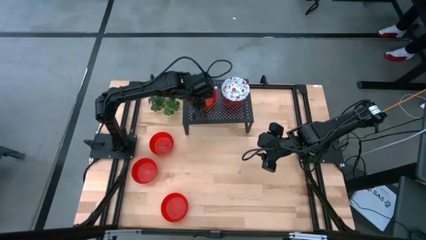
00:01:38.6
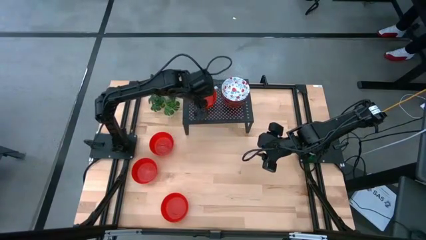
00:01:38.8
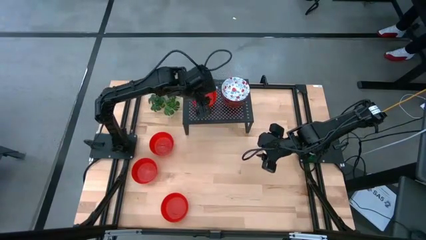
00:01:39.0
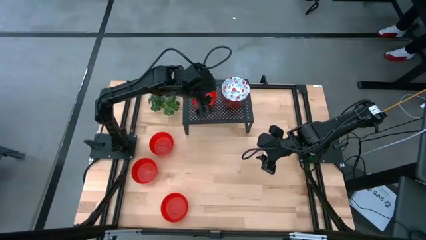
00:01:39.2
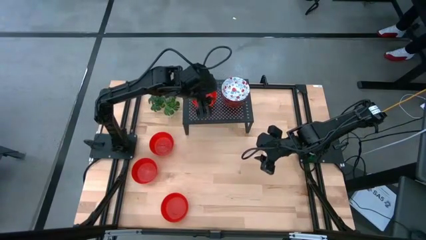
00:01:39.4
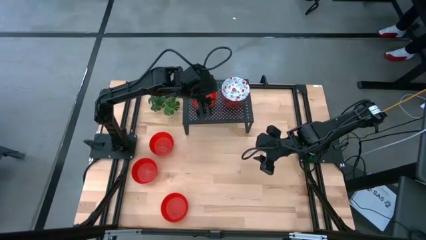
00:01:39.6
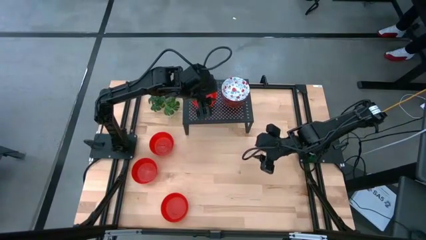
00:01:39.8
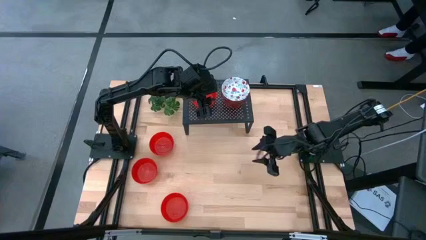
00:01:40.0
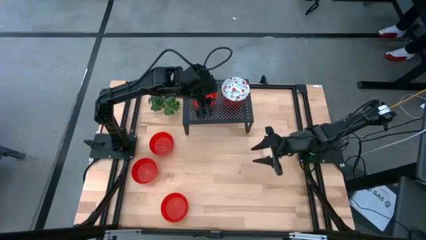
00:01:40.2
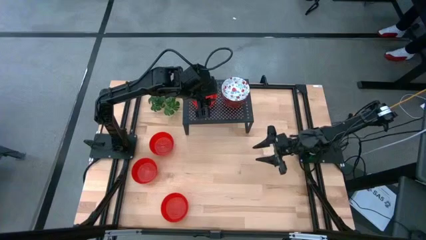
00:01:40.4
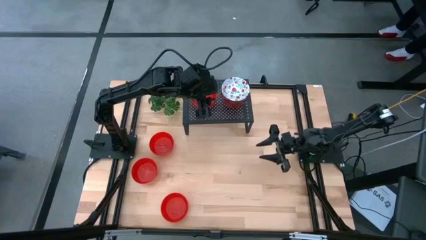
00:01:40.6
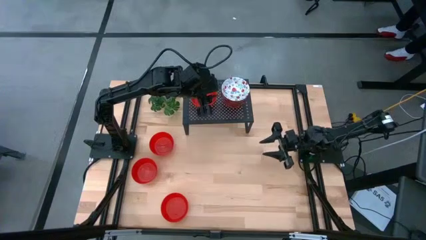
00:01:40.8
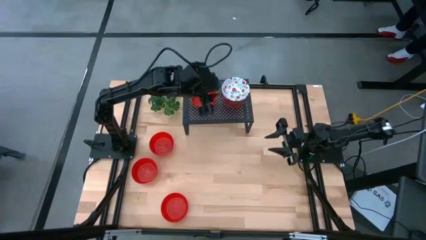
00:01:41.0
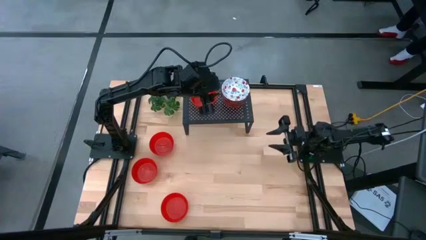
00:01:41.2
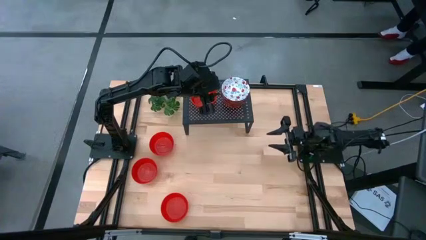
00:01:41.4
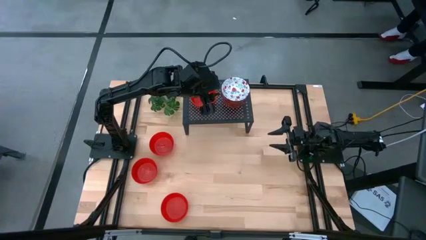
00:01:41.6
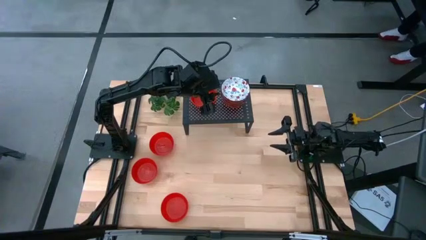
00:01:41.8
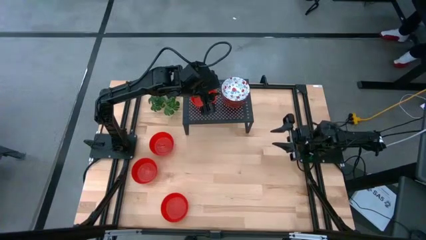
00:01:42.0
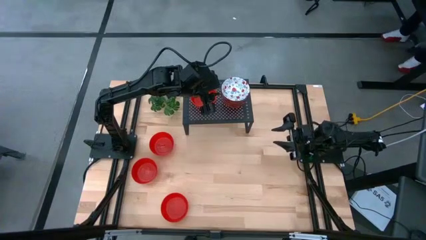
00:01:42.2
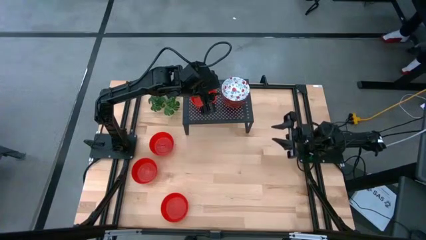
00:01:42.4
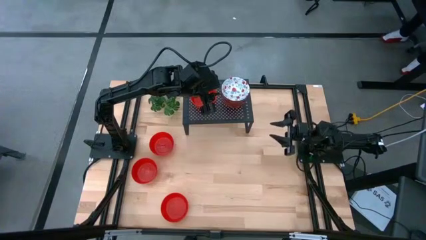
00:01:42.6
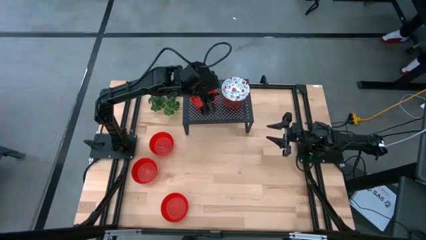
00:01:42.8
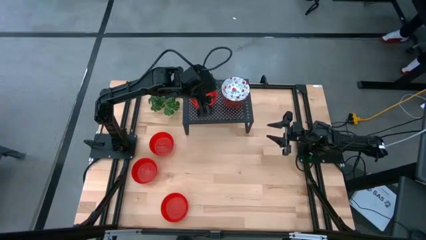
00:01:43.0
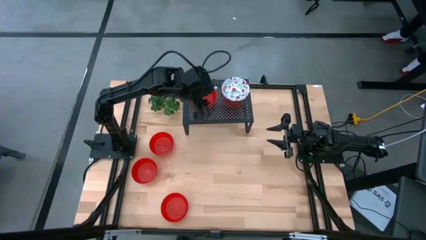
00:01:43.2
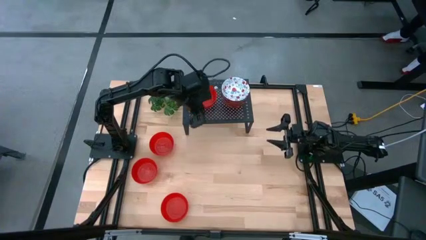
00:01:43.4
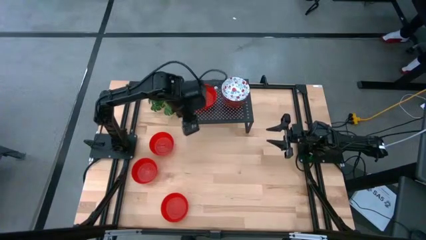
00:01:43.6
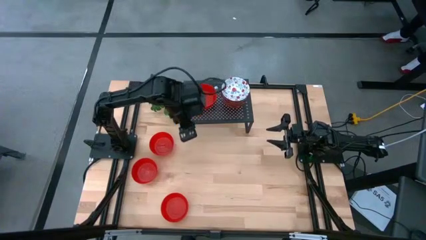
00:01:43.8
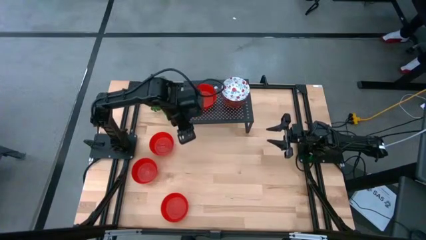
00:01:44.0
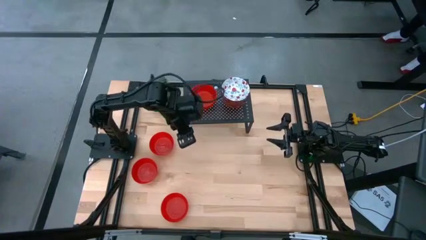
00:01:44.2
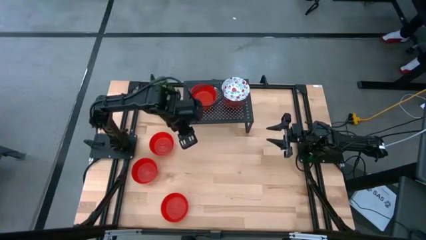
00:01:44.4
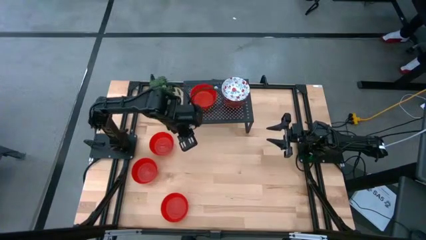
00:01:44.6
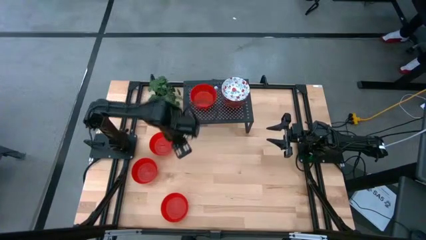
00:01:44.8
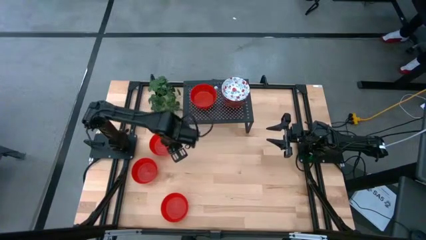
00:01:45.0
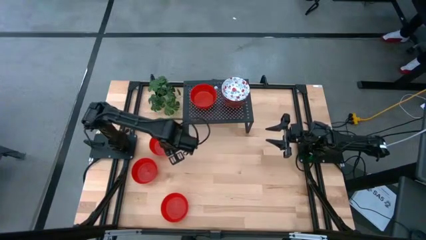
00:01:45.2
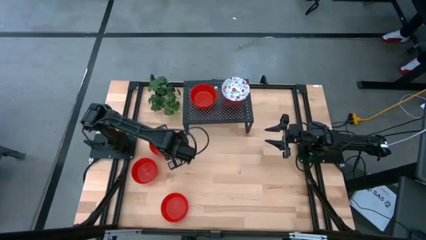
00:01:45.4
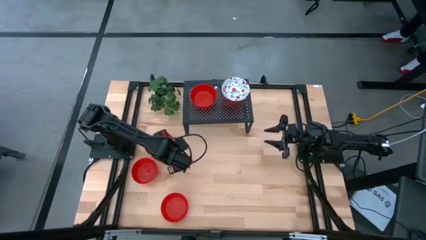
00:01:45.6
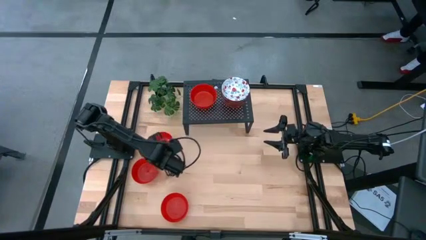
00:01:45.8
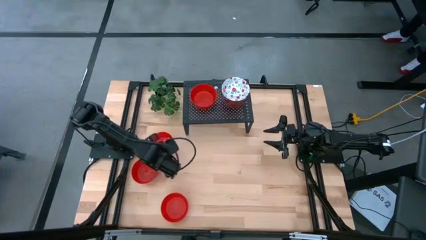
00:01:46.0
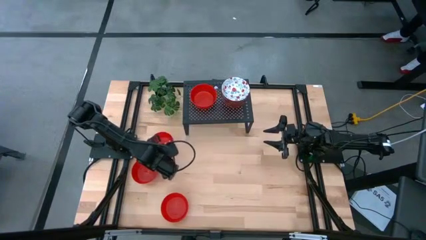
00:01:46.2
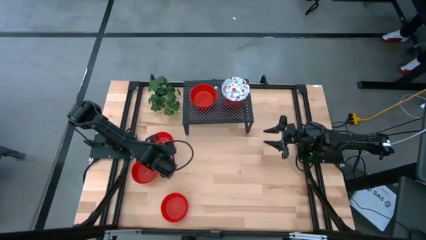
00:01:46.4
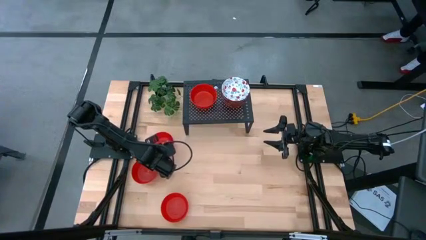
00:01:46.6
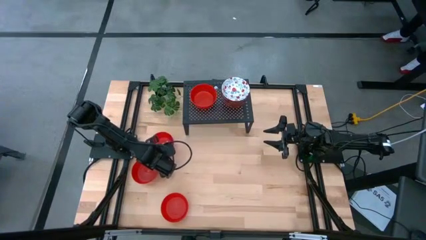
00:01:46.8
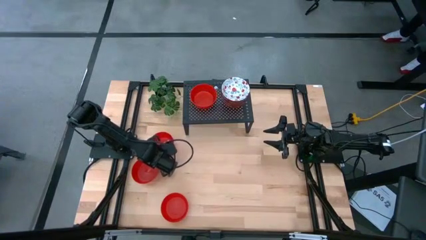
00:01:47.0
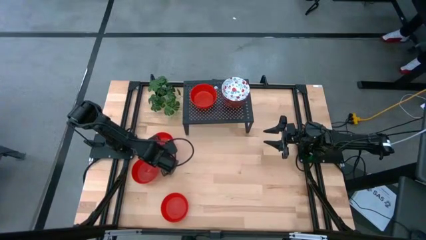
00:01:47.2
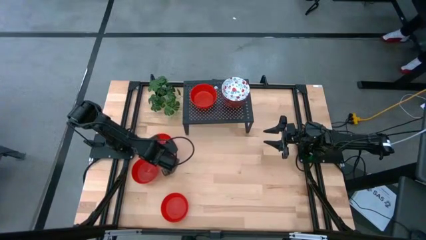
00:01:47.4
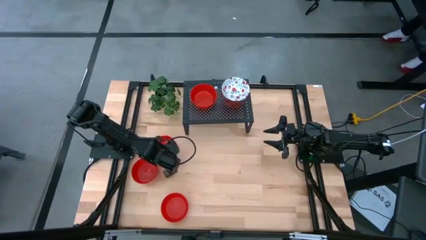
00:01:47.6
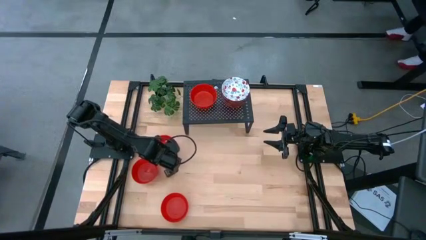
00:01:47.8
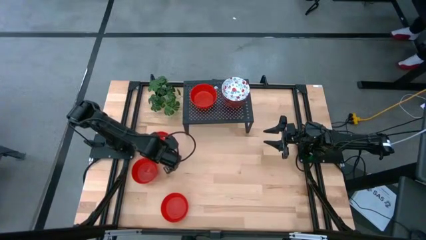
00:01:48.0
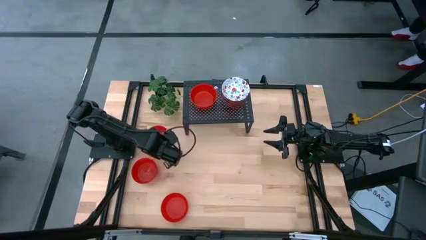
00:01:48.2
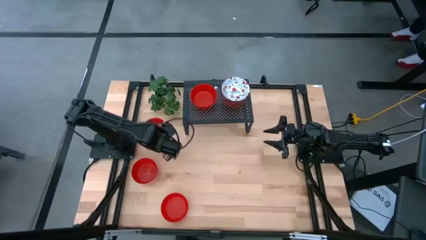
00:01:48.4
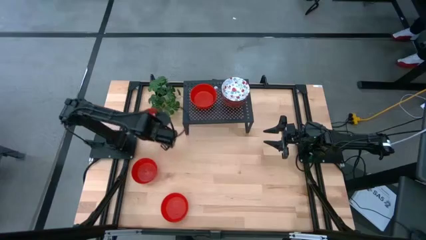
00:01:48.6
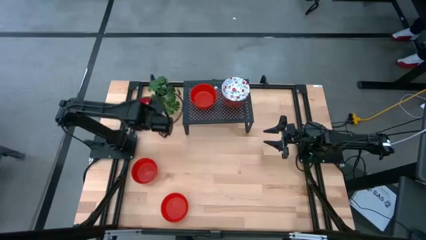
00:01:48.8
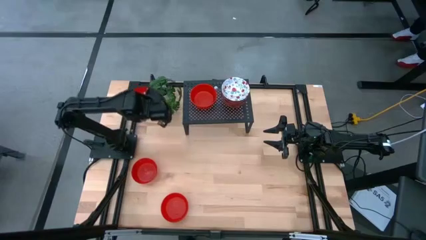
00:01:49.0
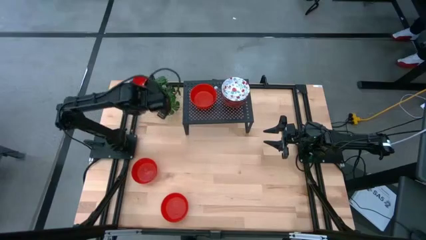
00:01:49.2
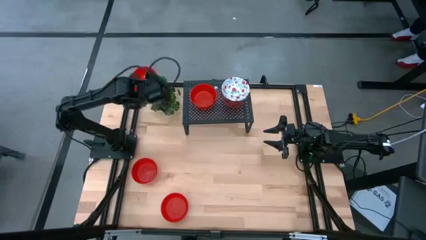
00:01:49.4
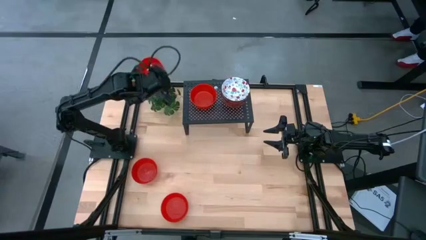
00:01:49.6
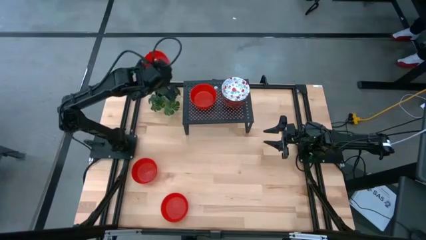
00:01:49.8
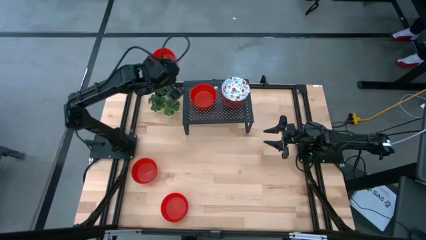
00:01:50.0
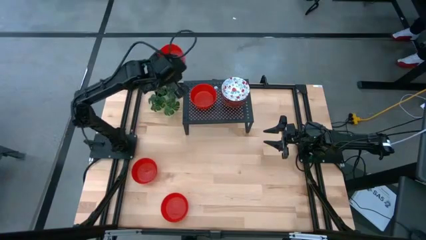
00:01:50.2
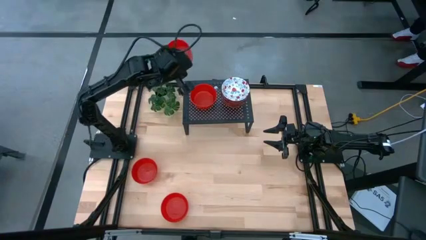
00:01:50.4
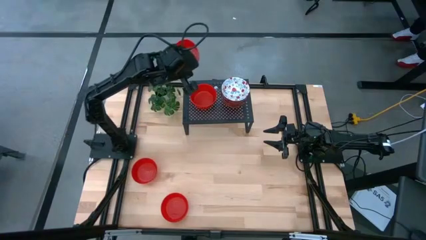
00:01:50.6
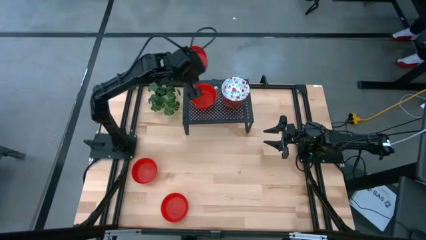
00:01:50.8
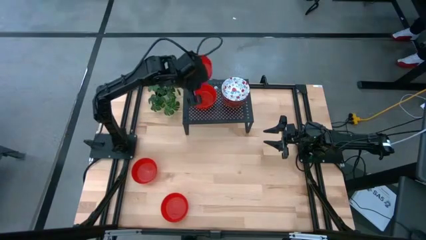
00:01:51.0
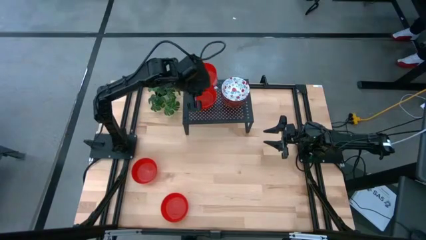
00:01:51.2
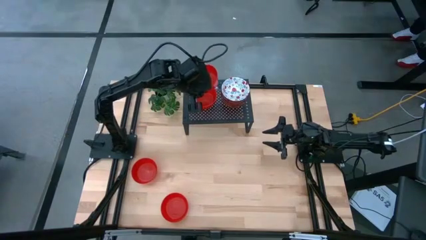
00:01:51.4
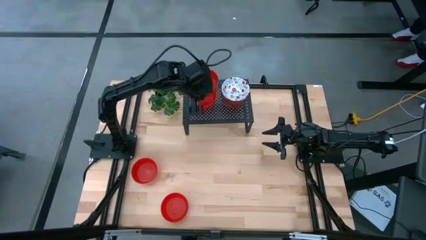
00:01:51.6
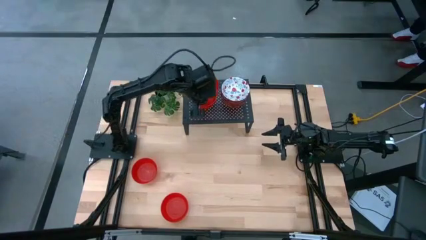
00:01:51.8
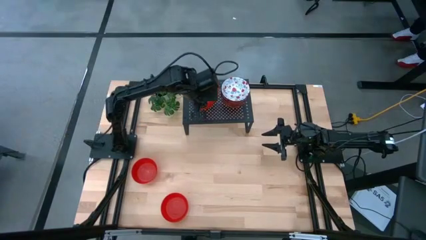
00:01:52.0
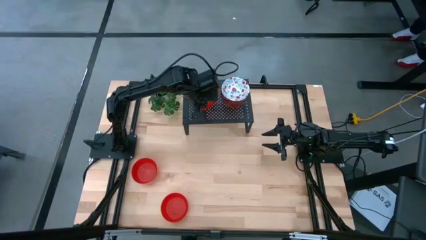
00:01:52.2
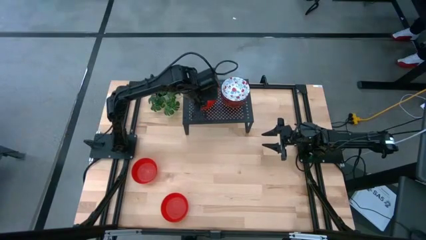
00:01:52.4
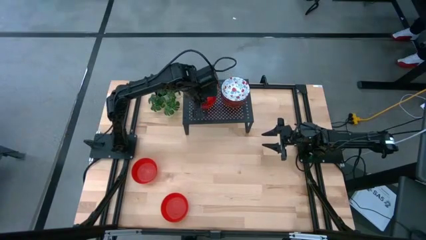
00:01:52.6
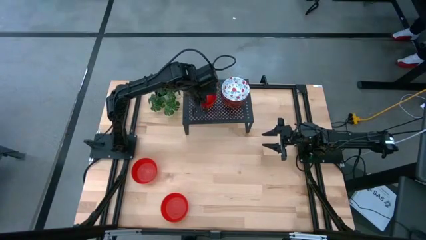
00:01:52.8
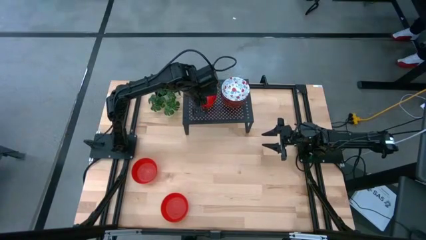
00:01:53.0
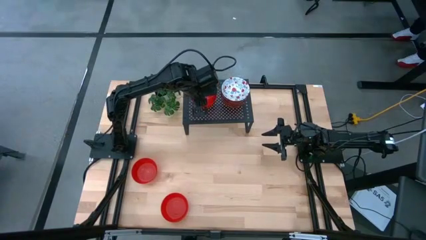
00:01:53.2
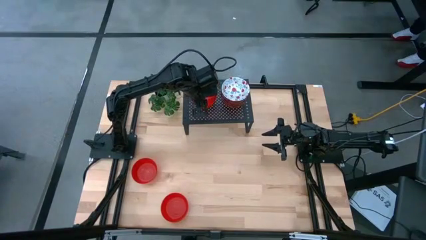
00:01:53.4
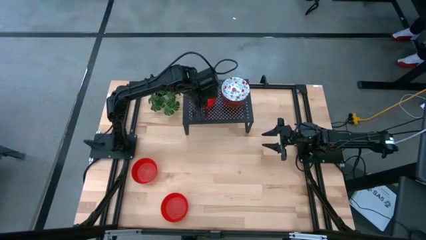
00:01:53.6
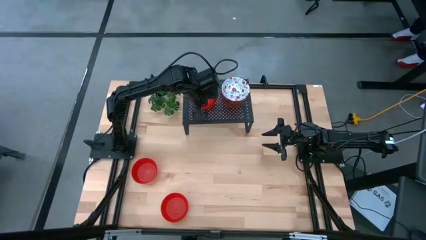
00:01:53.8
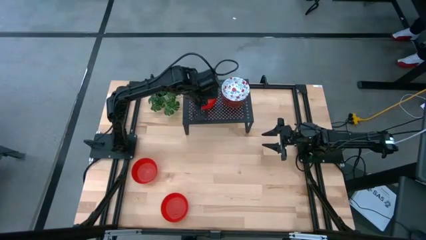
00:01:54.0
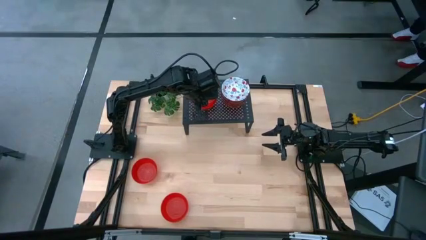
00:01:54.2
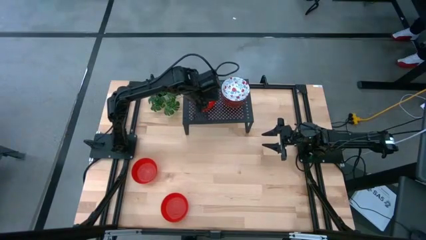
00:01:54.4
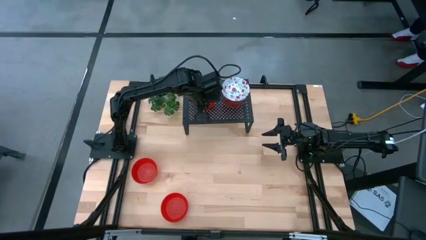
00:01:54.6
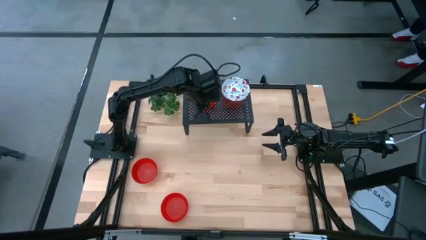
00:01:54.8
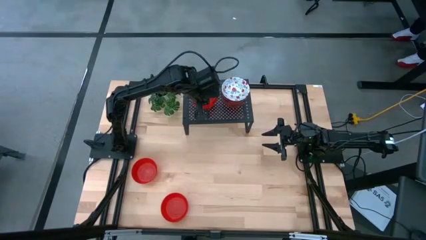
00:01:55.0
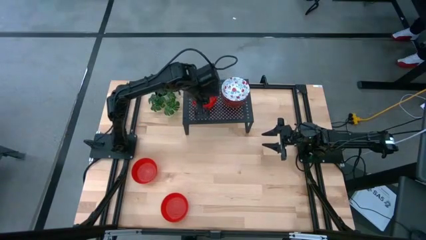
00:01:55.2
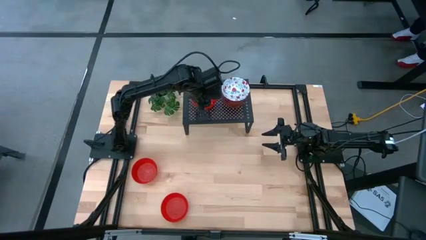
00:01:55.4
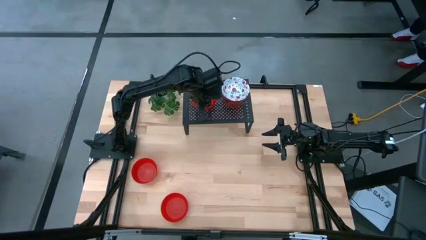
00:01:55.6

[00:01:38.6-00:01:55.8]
Task: Pick & Place Mini bowls
Stack the top red bowl on the top of the red bowl on the shelf
